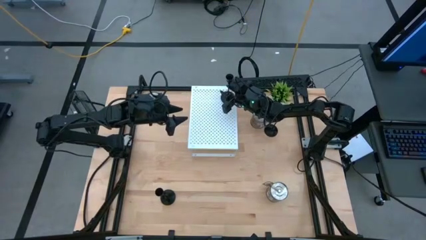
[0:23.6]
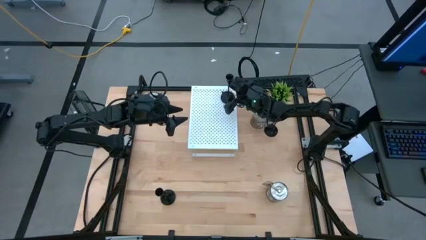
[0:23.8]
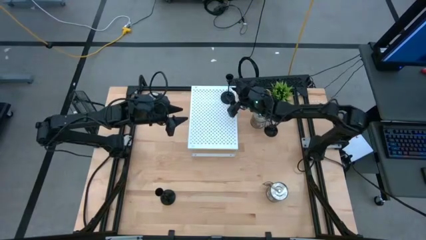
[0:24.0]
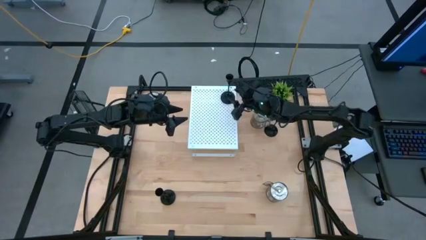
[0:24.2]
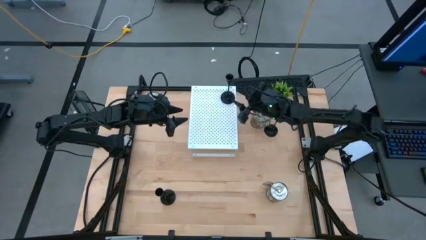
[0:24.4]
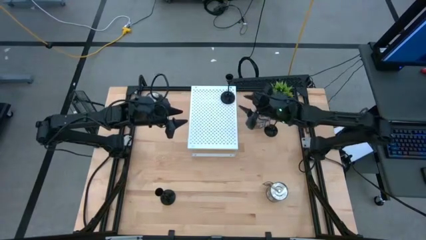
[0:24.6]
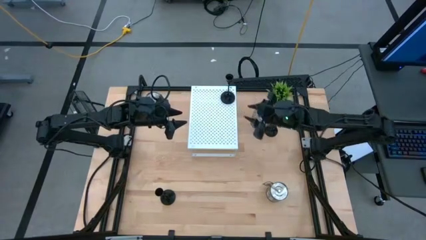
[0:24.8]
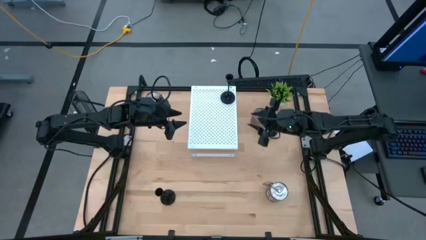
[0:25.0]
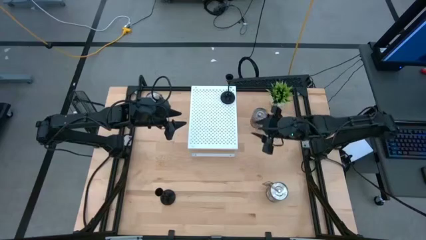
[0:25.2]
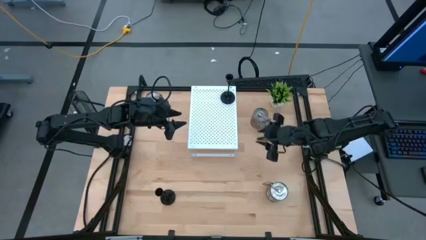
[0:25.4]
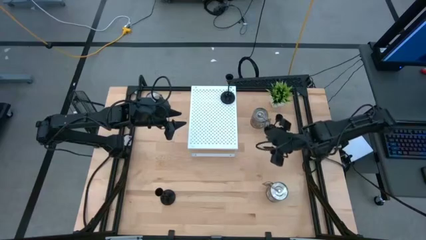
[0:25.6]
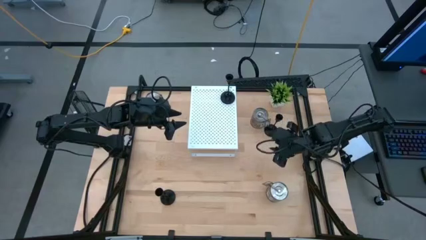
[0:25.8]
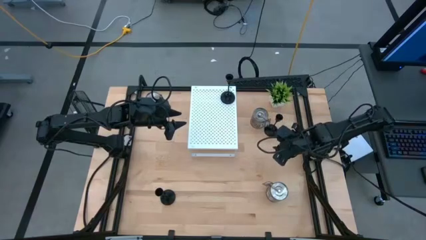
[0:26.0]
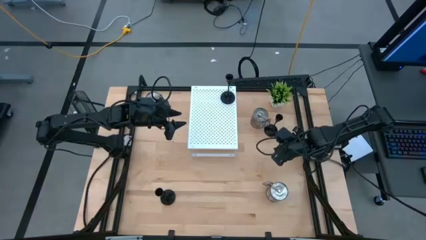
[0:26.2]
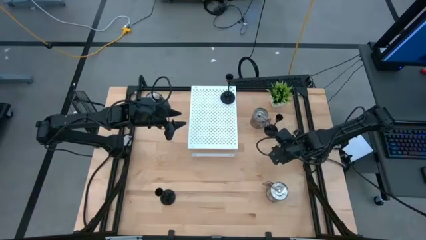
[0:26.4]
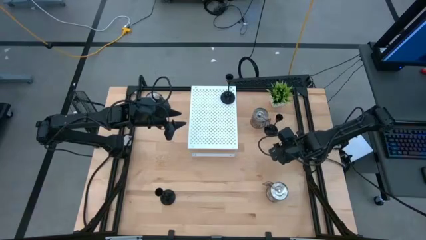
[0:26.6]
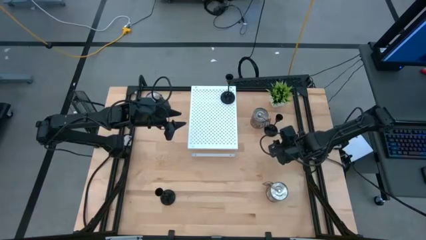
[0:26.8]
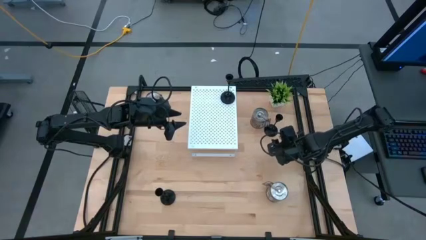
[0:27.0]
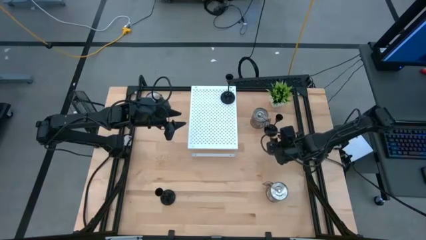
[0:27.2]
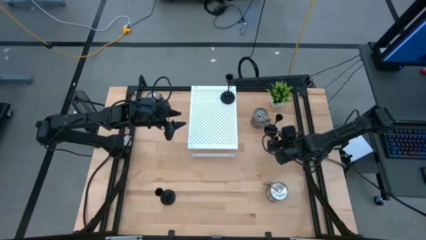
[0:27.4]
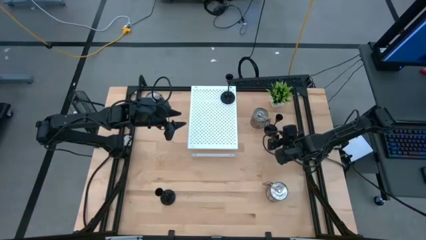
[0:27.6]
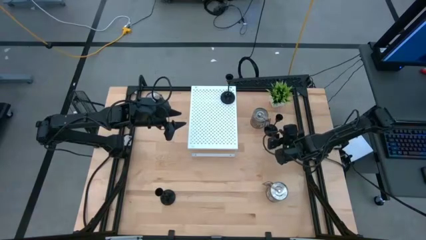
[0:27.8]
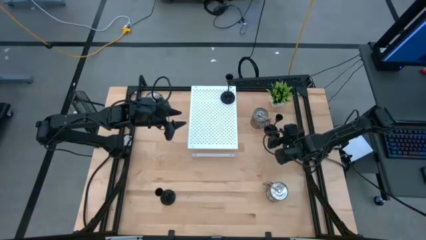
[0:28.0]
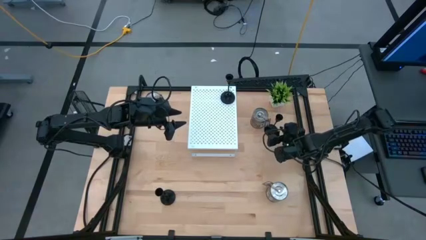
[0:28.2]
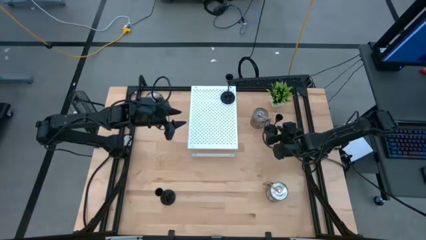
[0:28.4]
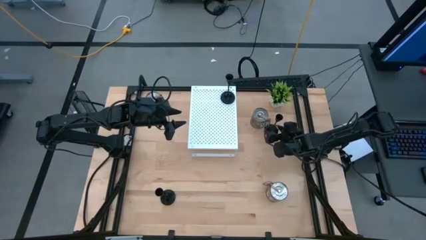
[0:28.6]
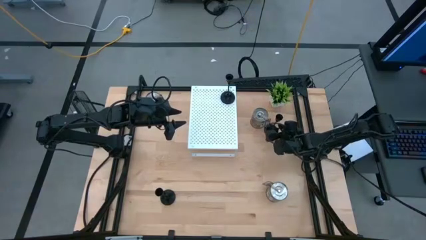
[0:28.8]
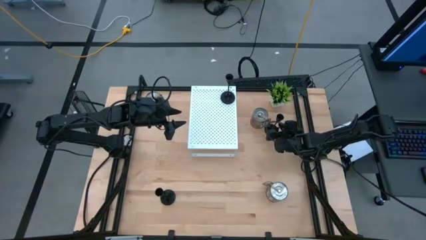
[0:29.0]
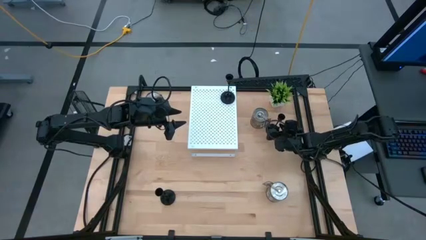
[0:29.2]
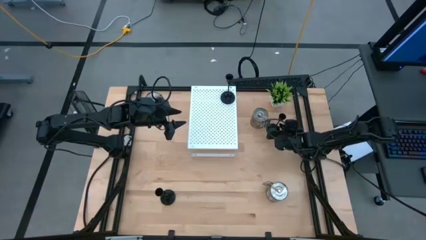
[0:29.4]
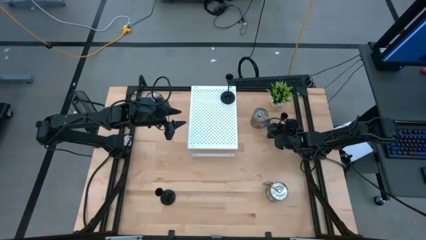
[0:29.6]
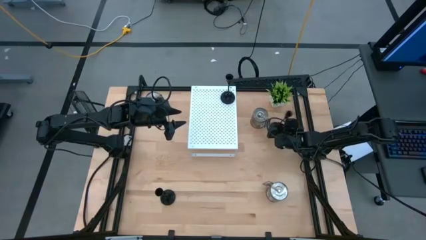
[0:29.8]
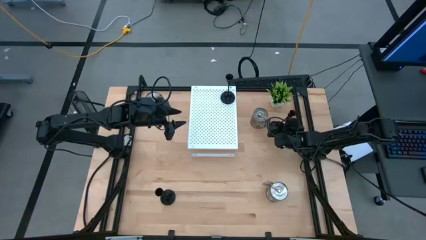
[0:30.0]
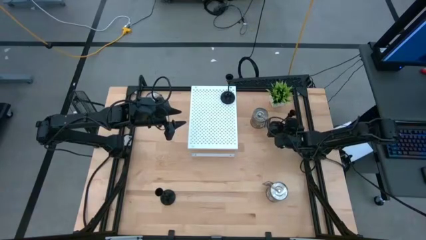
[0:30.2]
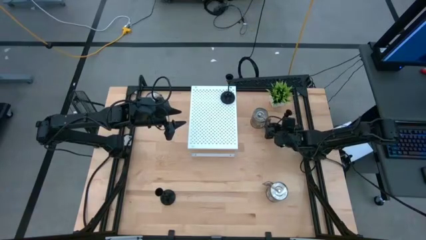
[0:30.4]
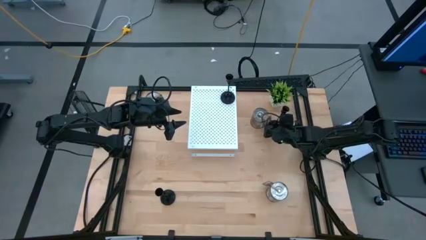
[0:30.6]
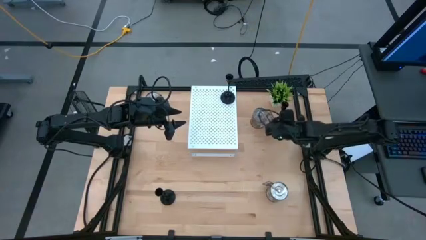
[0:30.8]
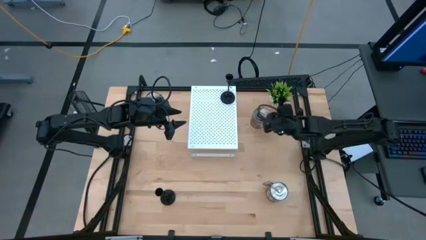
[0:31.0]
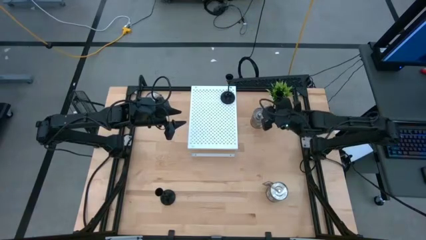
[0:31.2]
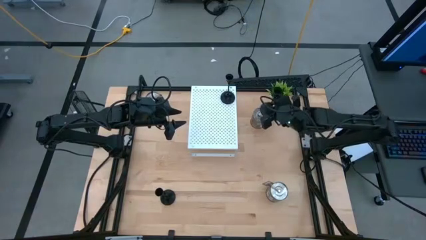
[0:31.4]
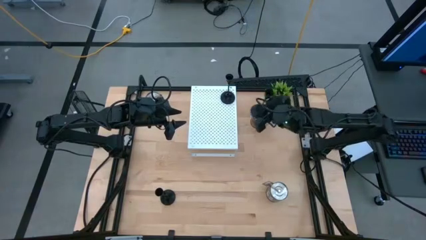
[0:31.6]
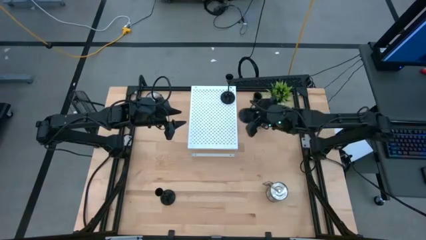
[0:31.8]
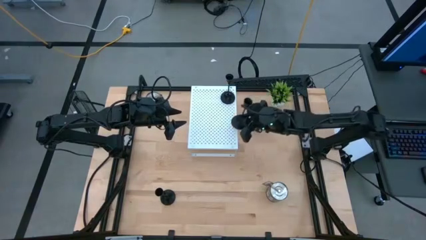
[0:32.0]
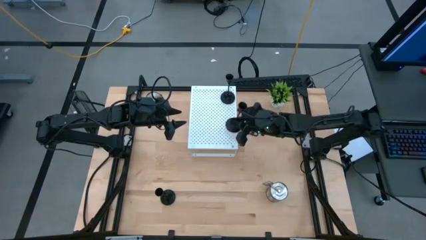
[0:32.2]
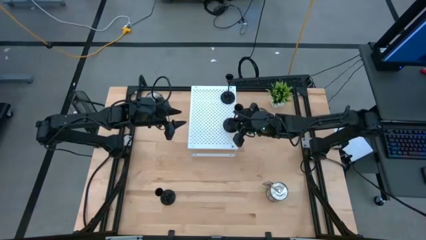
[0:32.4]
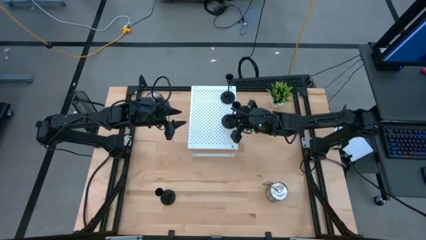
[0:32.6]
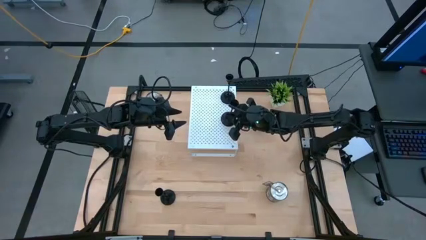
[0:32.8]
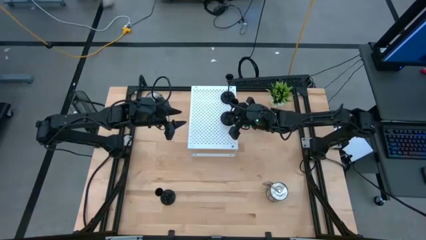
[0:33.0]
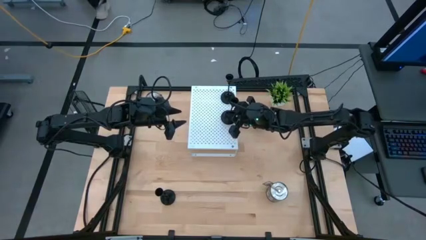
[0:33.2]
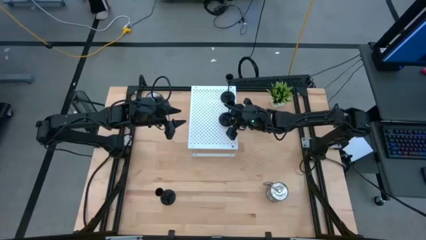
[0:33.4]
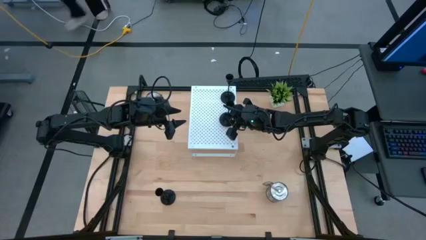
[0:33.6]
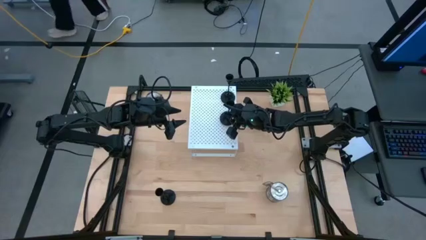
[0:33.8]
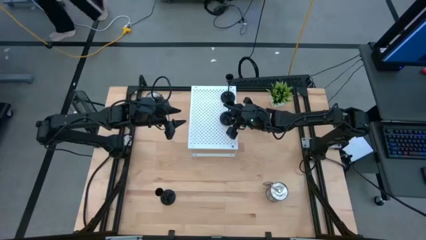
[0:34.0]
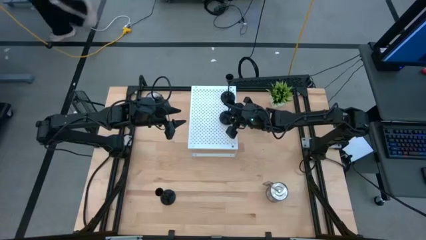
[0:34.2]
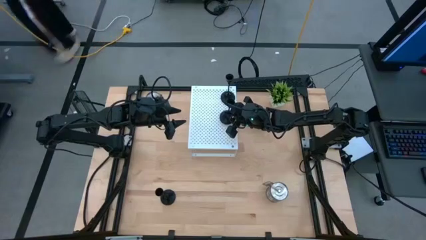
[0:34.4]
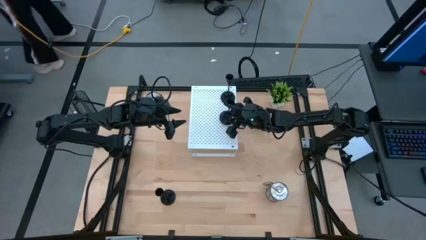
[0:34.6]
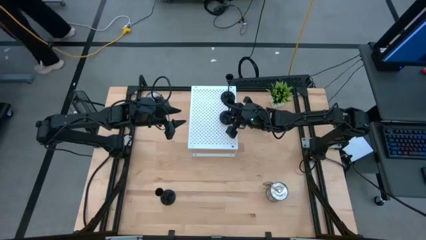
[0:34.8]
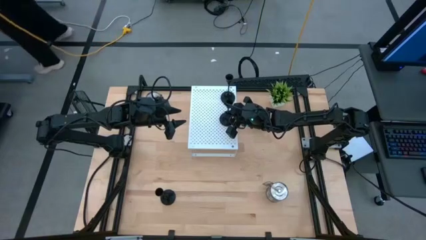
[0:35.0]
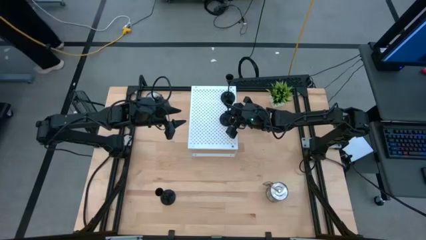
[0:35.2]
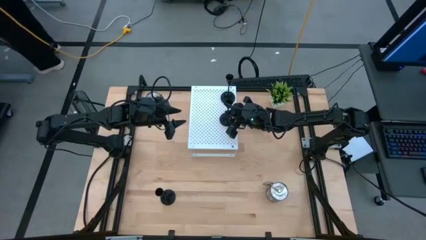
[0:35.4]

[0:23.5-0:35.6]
Task: Pick & Place candle stick holders
Put the top black candle holder on the shelf aligned with the black candle holder

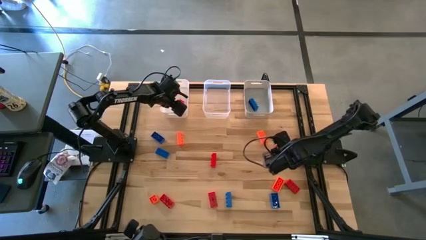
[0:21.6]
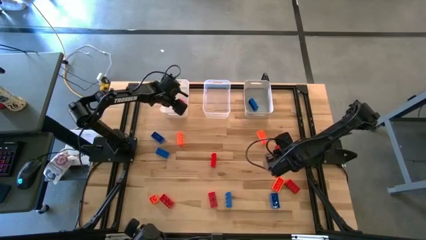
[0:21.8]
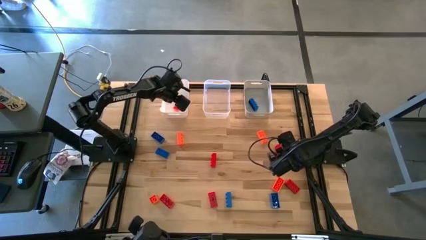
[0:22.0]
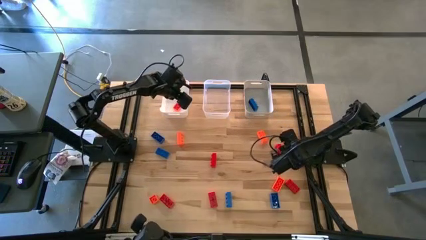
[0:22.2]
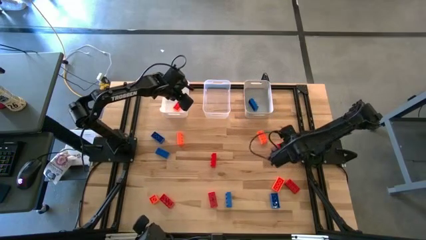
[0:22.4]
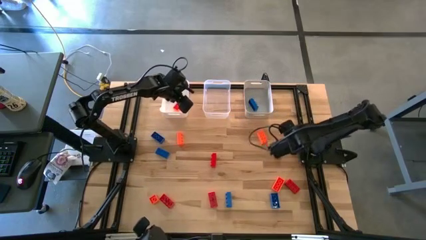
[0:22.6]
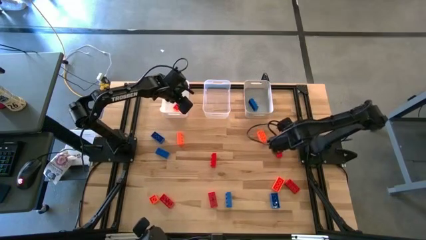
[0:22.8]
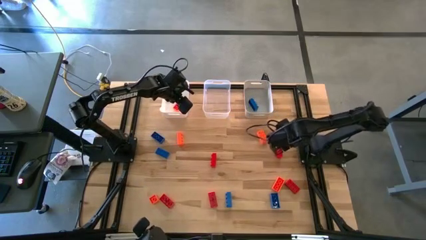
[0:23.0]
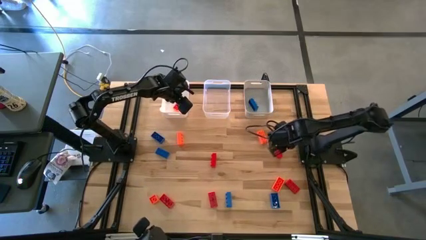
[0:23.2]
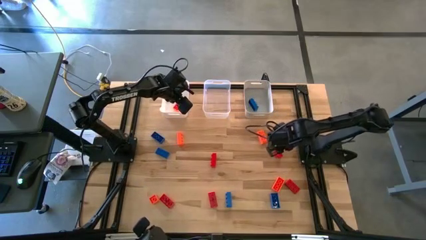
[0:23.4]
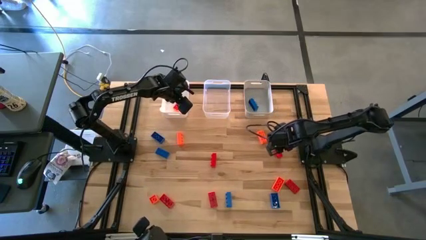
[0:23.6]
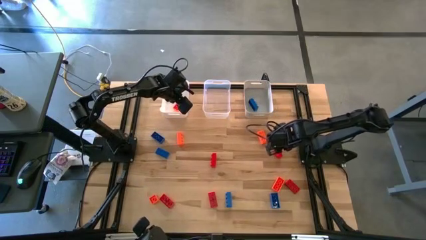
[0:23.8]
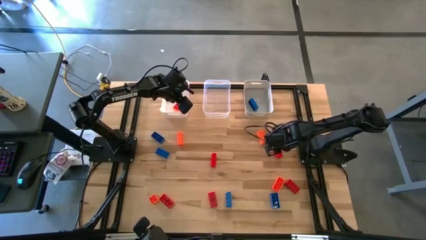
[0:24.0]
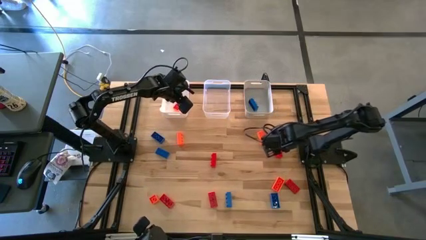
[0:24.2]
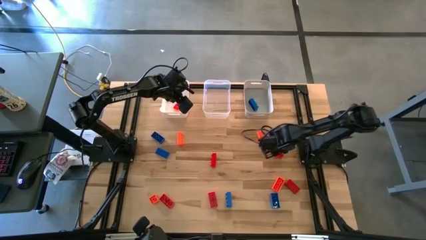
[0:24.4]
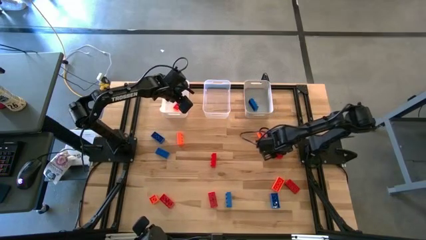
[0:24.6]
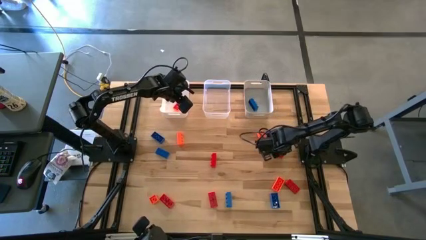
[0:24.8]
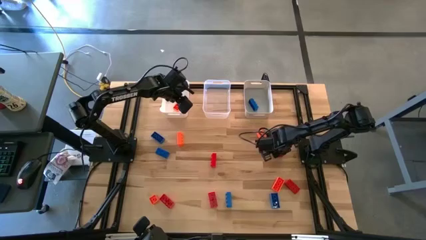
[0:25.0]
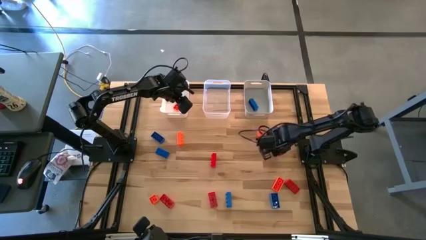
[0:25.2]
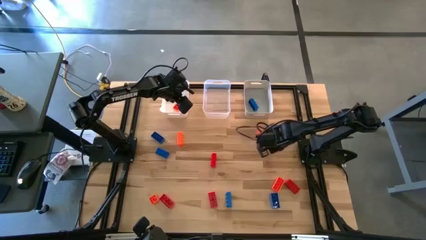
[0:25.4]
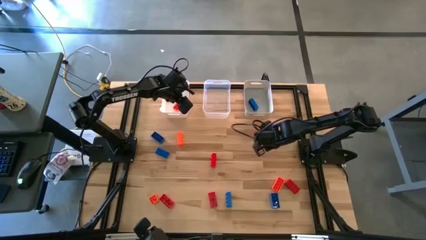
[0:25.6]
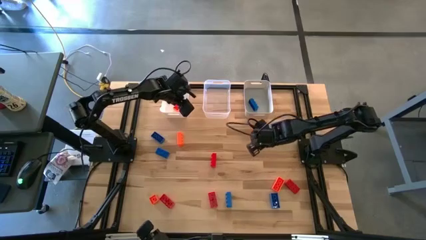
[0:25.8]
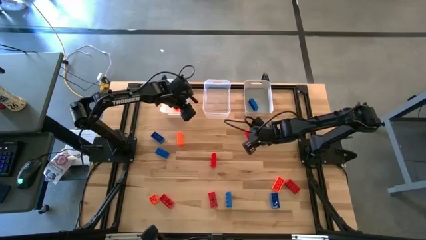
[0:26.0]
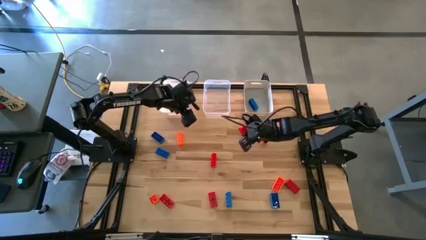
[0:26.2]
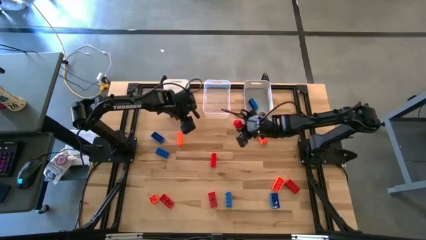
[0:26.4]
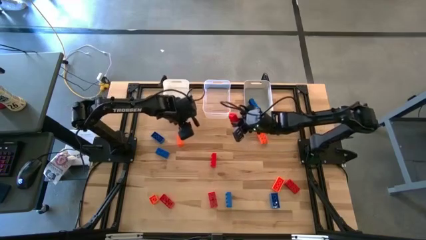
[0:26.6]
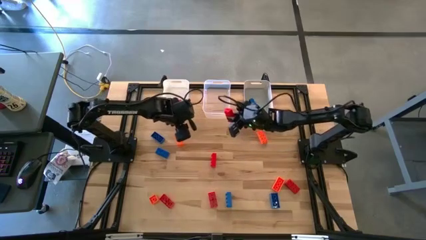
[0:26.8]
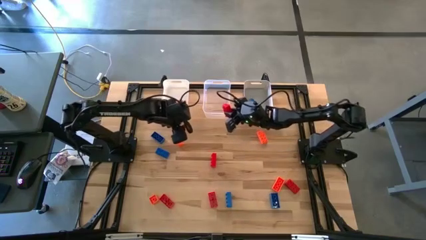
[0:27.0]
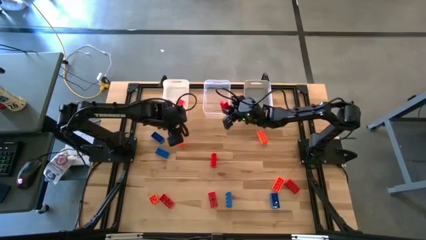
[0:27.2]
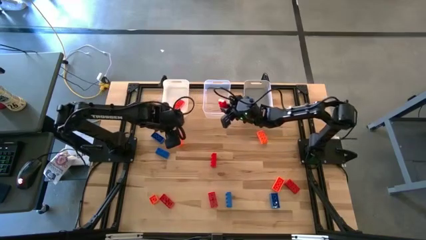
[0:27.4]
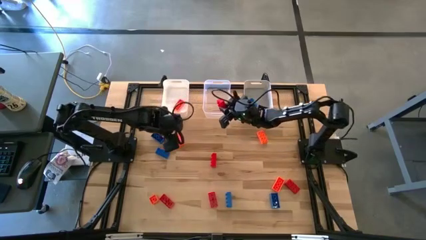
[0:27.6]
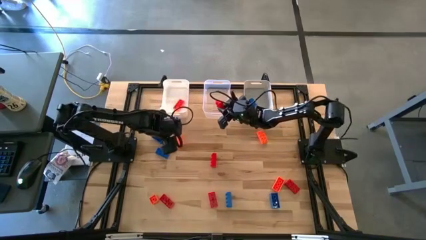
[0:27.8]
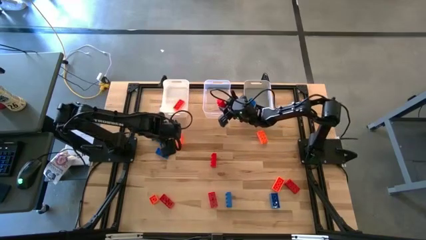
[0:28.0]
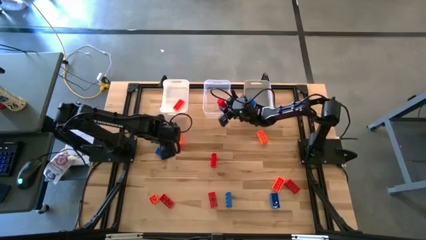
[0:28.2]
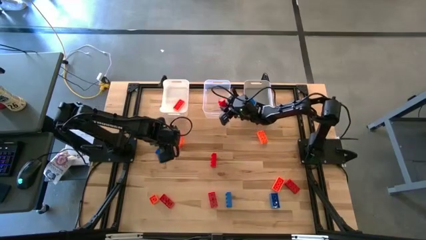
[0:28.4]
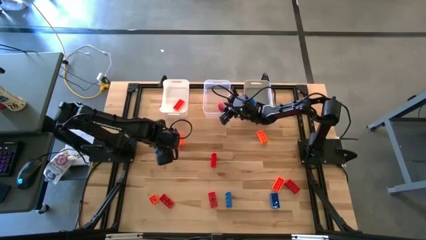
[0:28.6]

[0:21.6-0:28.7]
Task: Sort & place blocks by color
Put the red game piece into the transparent bin
